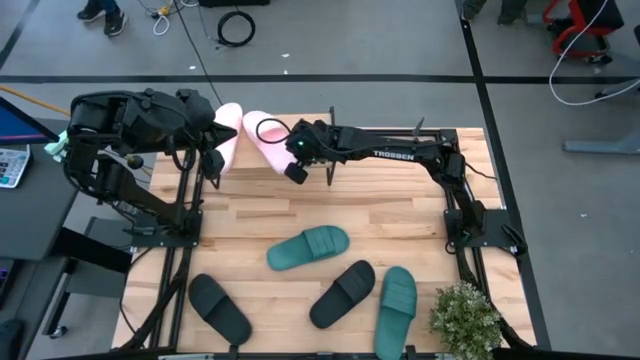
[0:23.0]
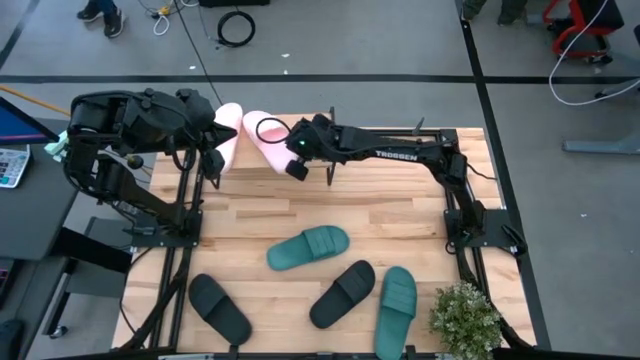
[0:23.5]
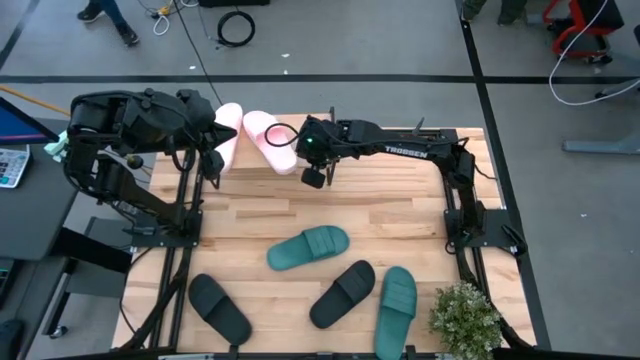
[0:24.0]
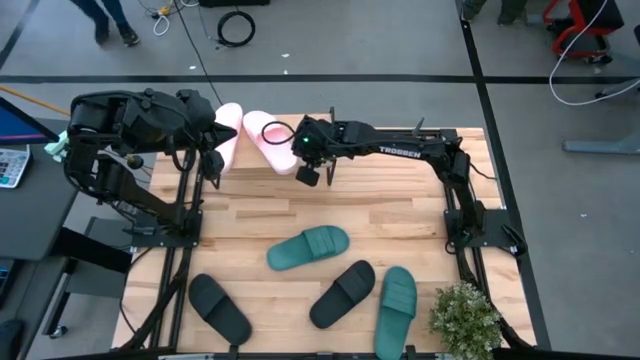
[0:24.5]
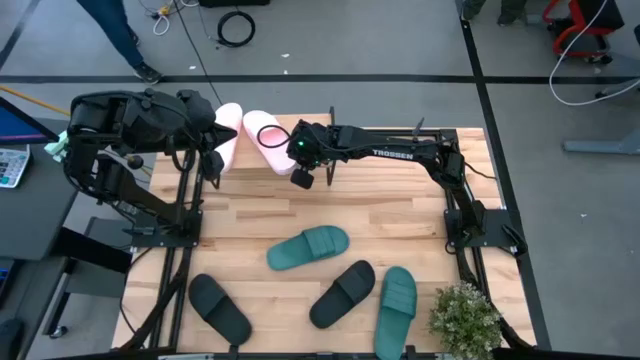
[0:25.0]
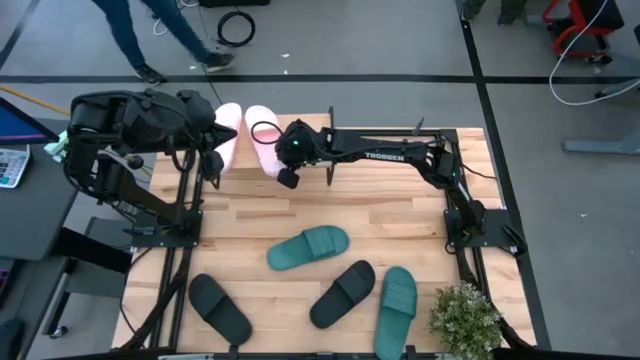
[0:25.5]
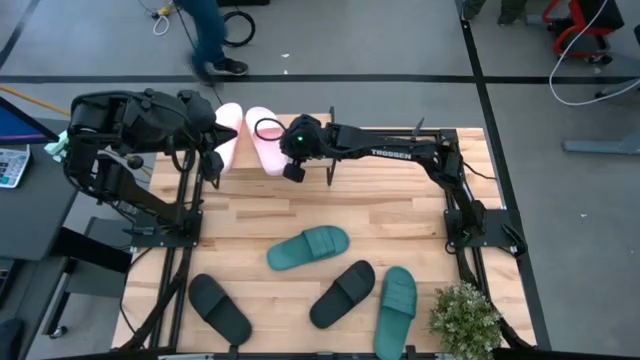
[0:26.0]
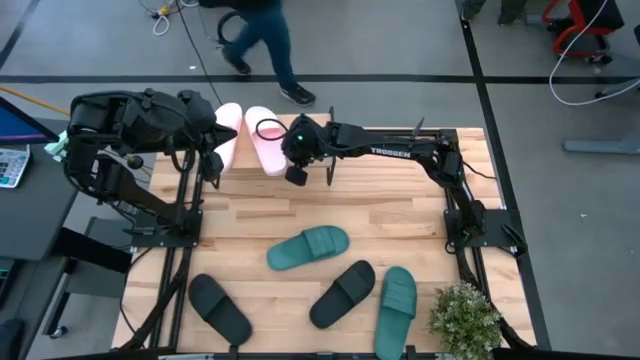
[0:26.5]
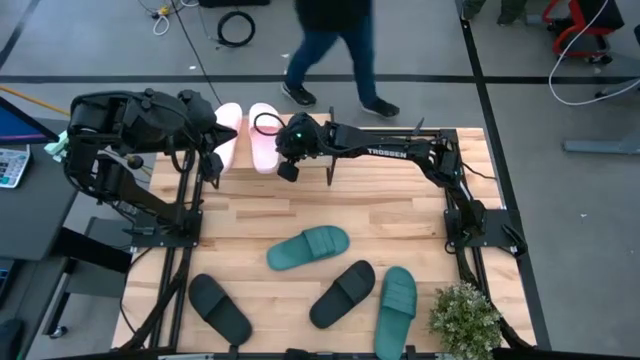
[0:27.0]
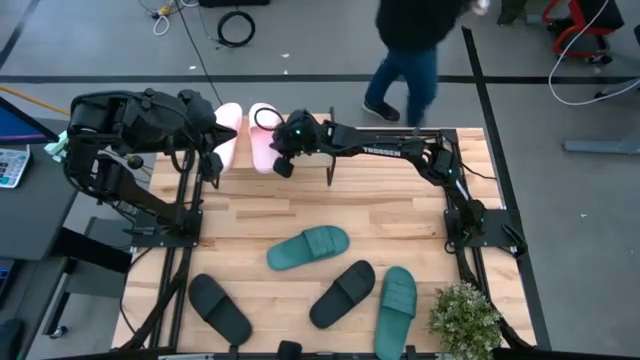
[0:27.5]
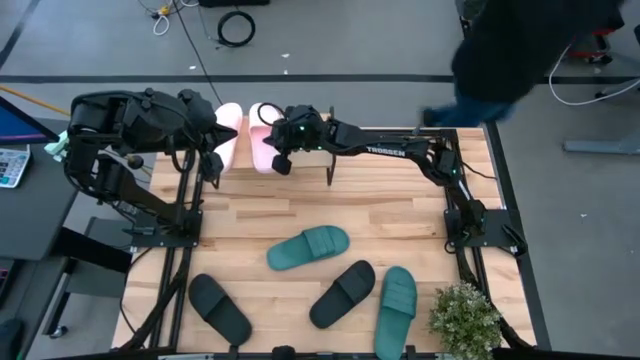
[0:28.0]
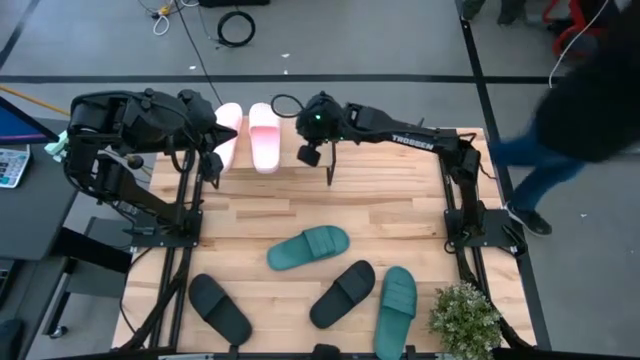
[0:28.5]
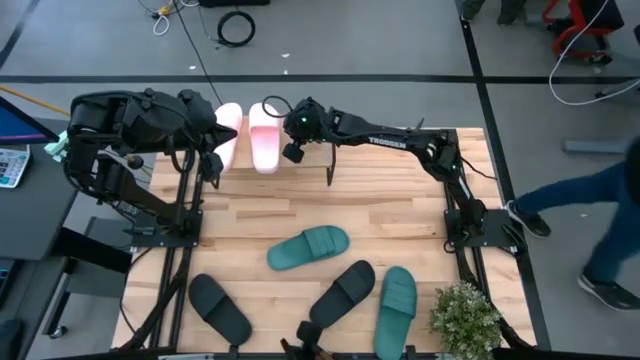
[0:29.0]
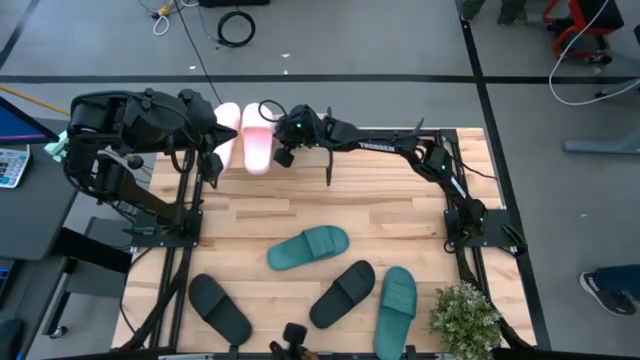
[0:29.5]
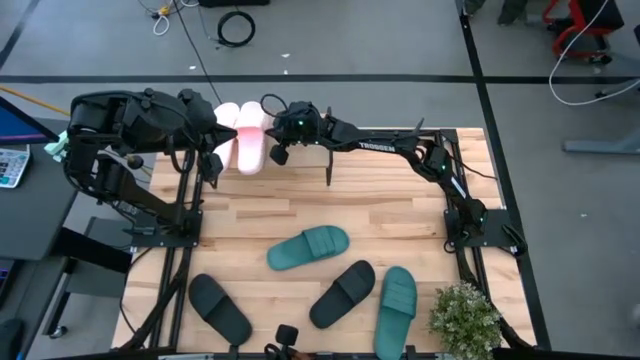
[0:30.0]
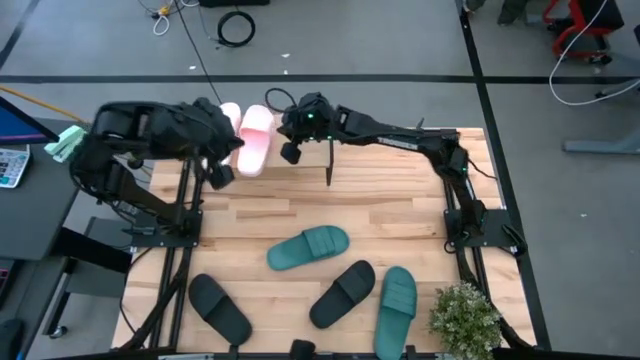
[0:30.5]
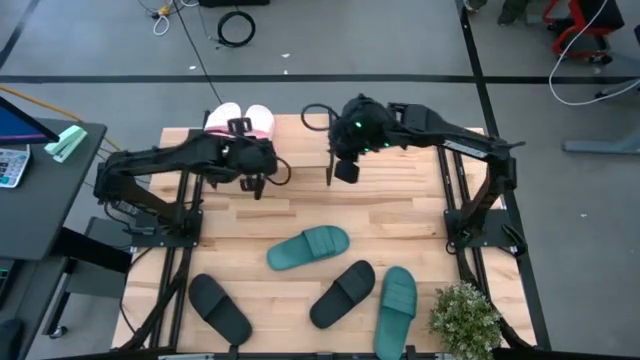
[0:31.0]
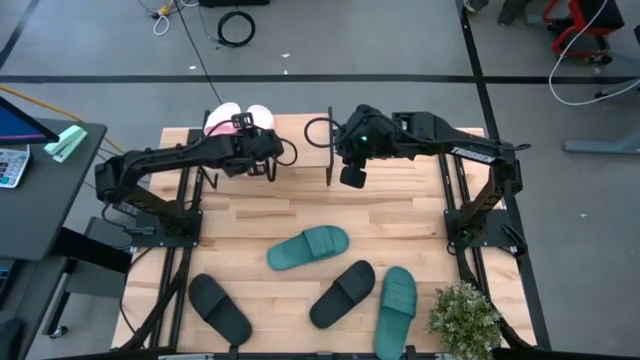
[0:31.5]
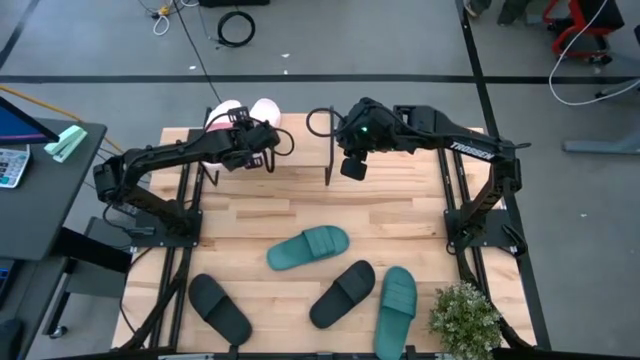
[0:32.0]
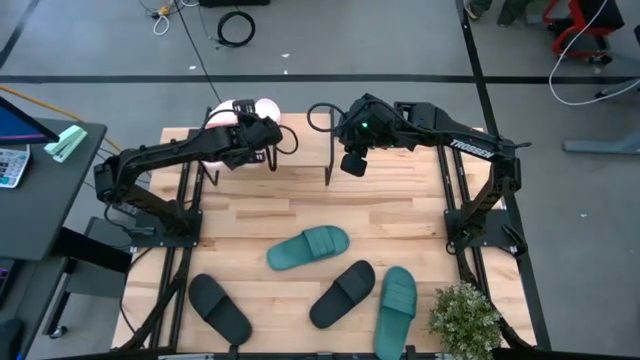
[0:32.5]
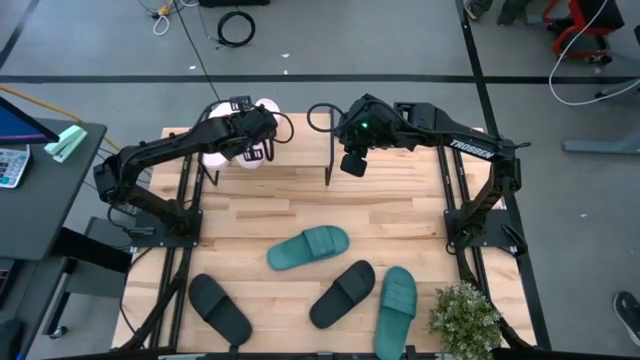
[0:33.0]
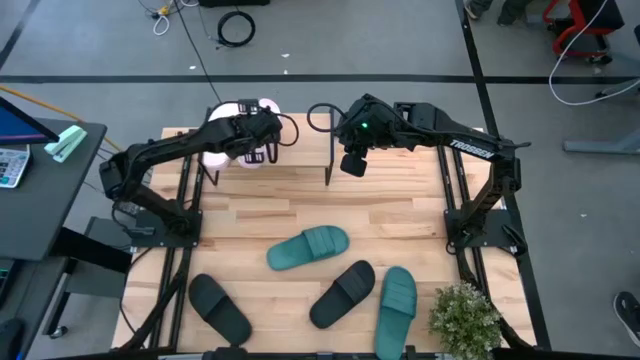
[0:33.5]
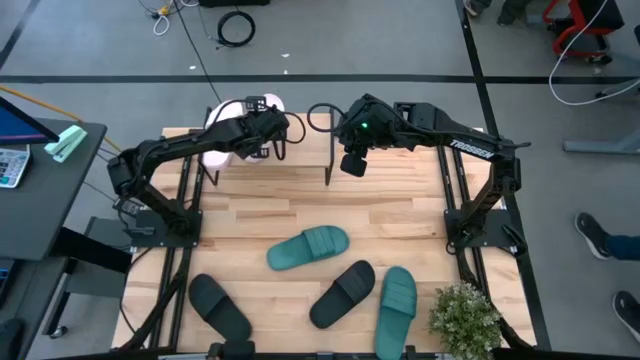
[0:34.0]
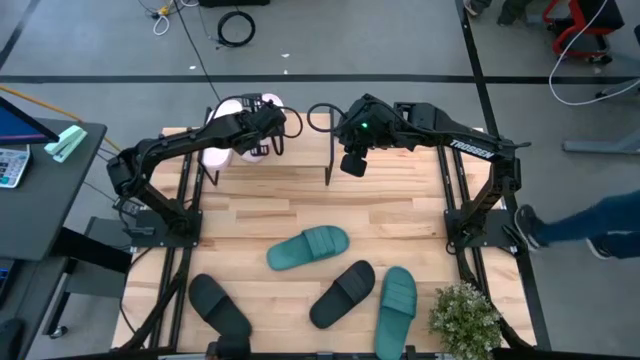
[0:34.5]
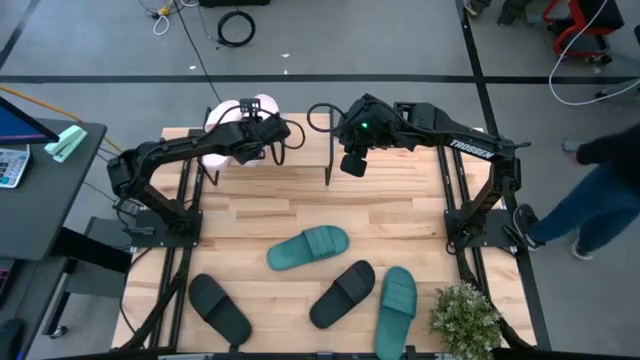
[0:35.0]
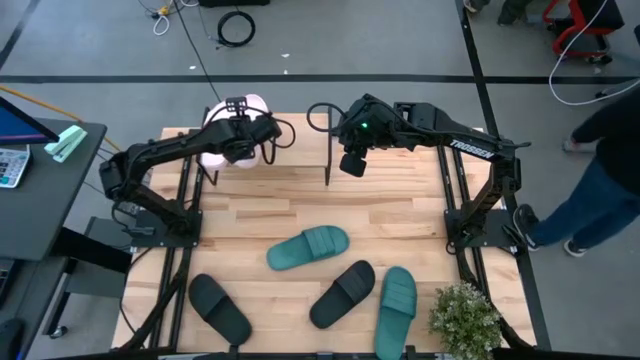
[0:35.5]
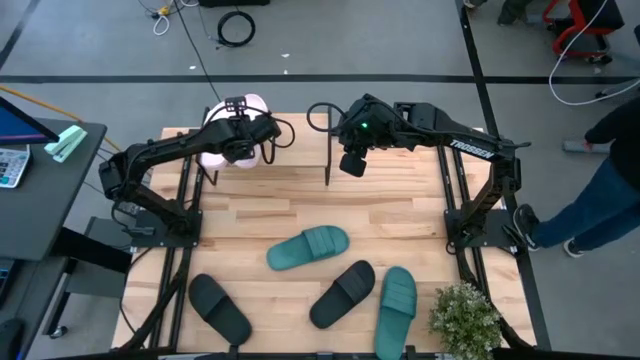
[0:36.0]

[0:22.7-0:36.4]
Task: Pick and place slides into the shelf
Put the pink slide on the shelf

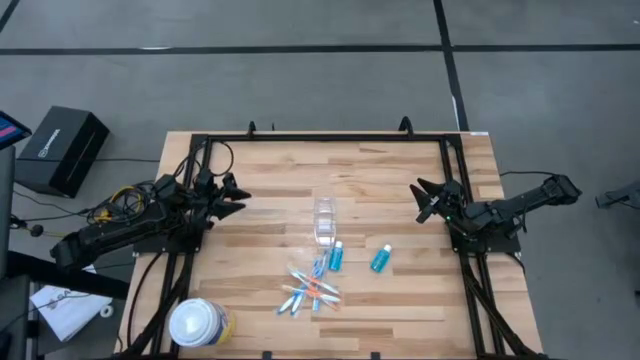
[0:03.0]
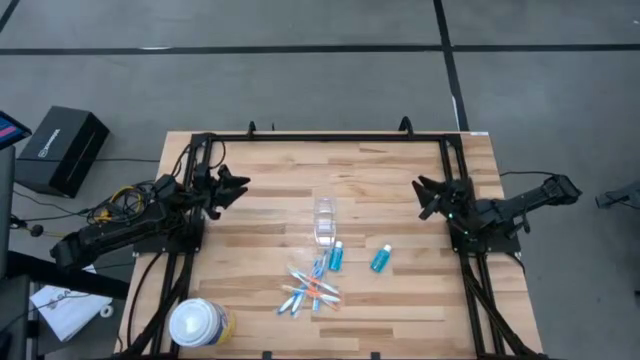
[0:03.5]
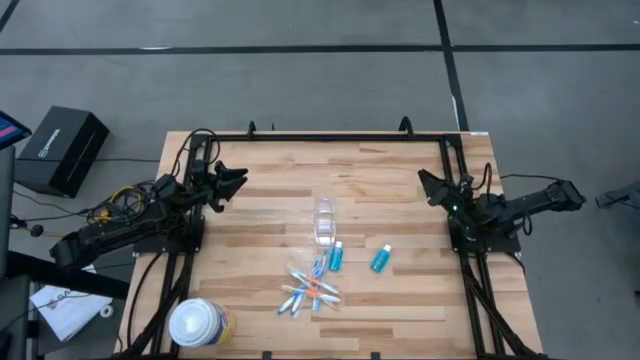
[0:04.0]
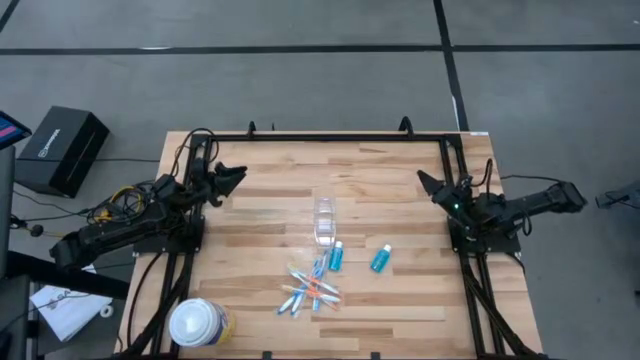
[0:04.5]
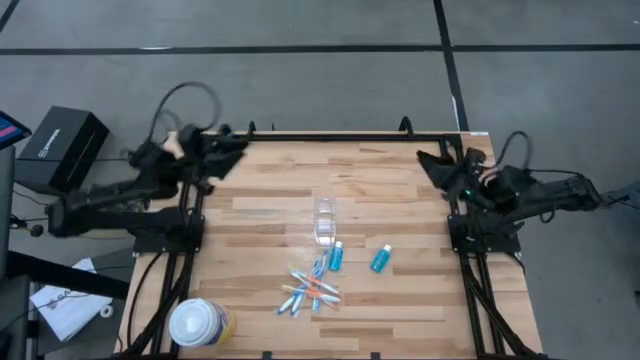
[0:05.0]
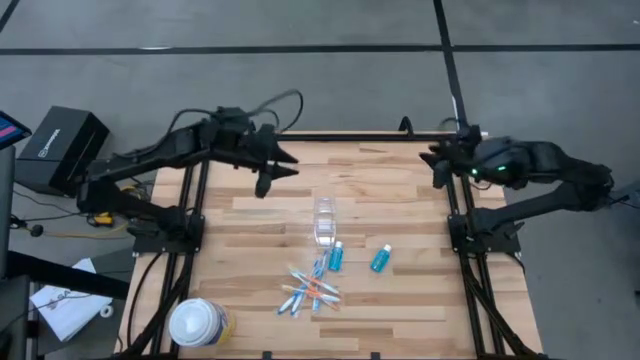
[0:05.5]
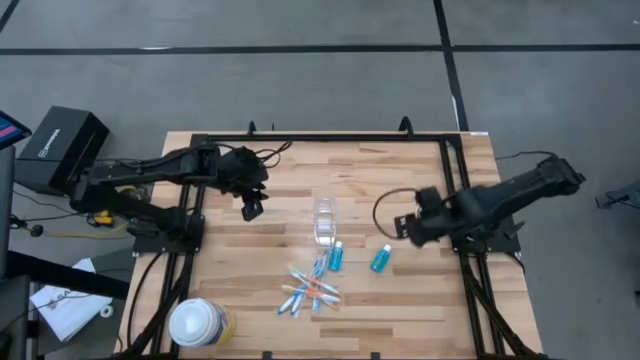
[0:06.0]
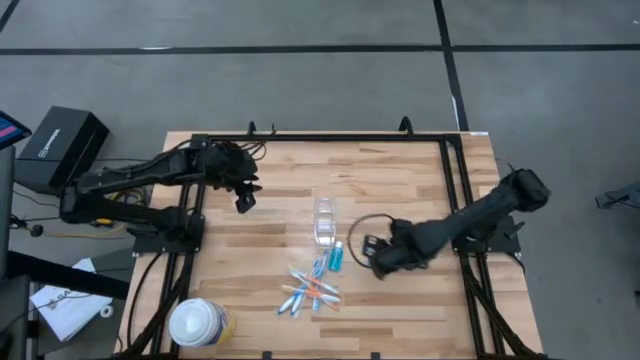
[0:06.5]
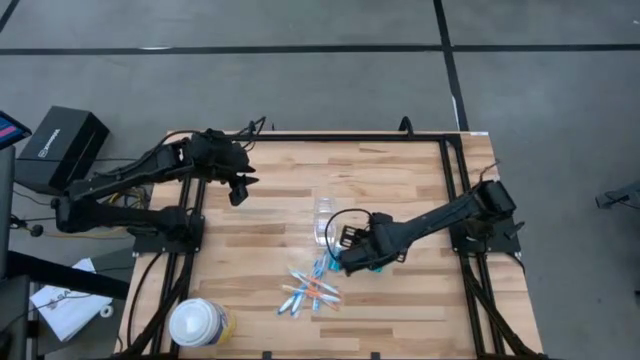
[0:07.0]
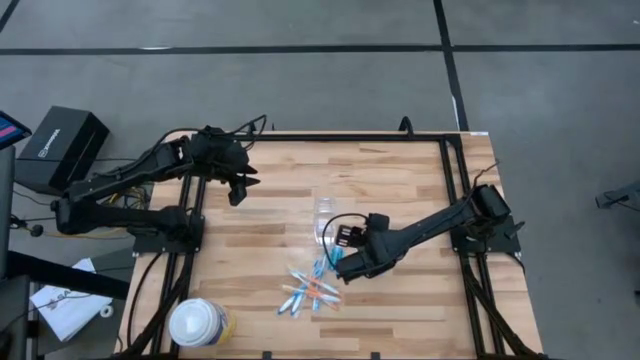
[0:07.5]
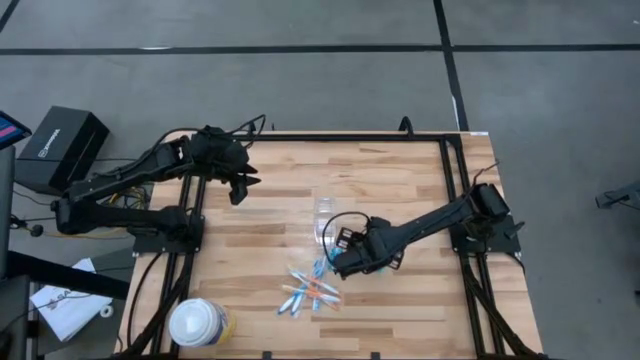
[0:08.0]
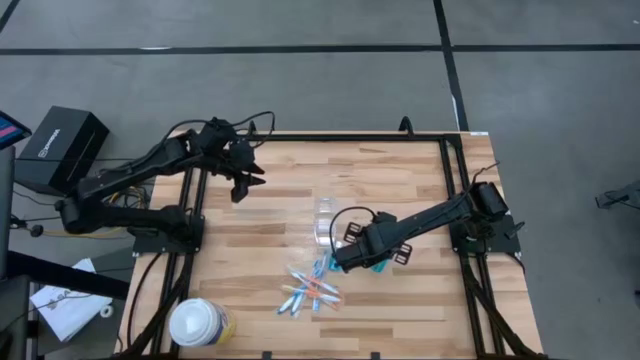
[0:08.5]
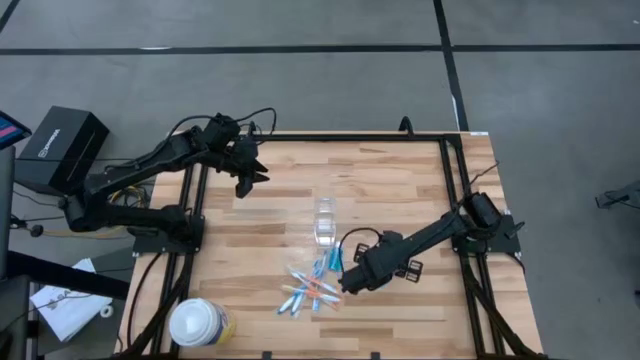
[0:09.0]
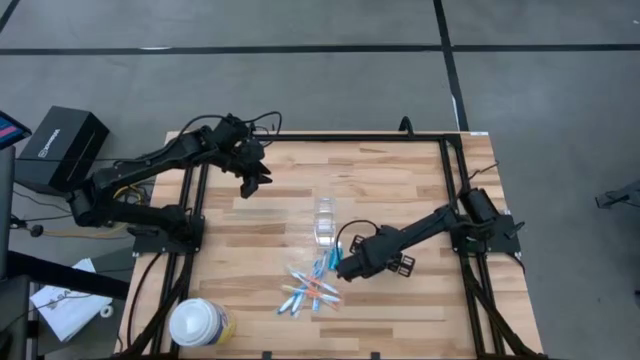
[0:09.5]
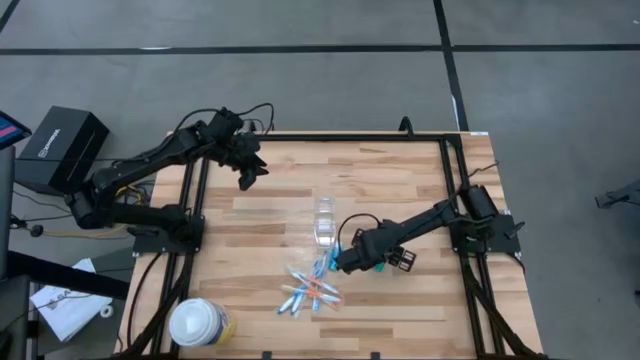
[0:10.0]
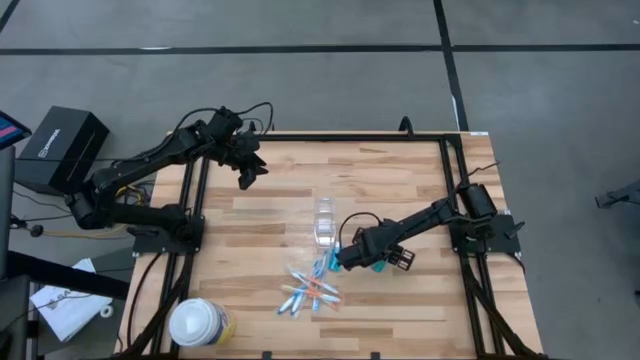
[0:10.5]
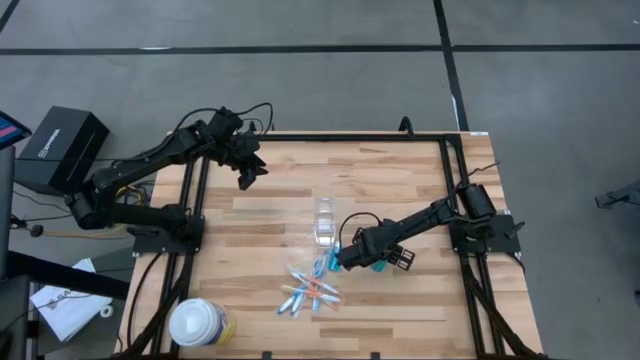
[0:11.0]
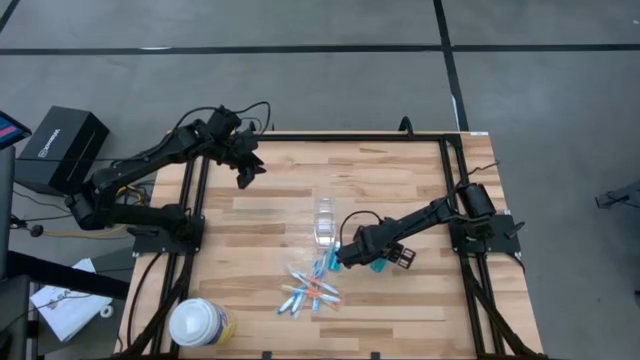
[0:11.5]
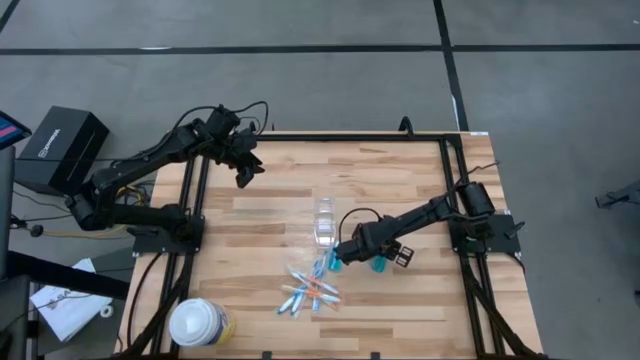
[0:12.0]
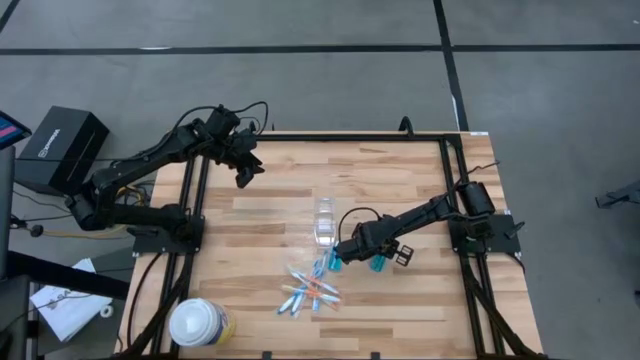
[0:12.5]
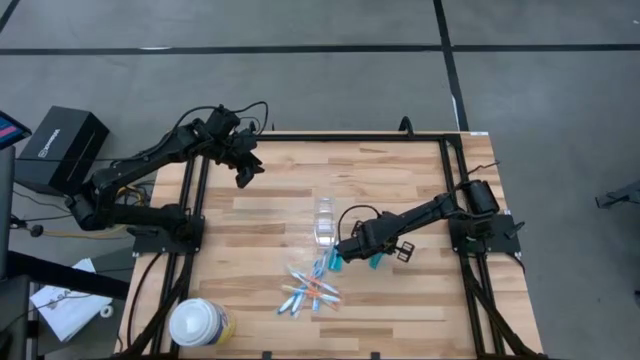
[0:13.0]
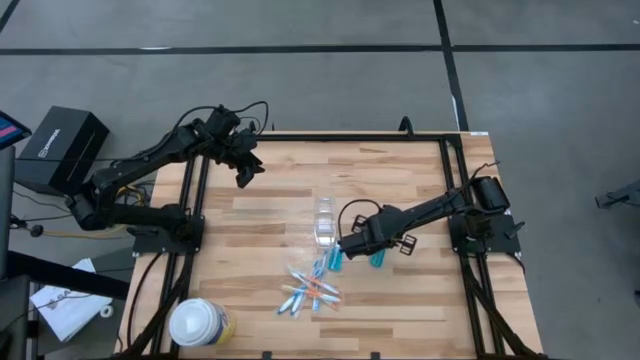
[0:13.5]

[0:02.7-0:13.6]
Task: Pick & Place toothbrushing station
Put the right mouthwash into the middle section of the transparent organizer
